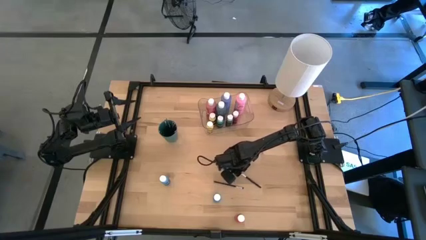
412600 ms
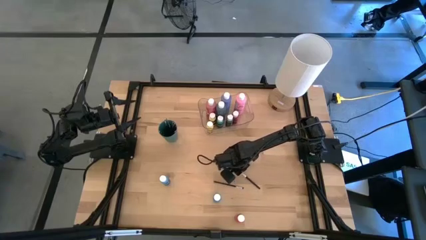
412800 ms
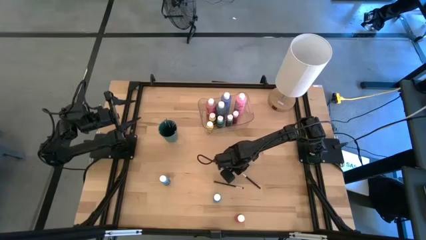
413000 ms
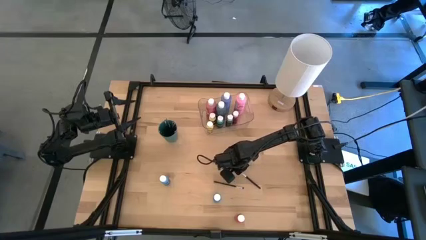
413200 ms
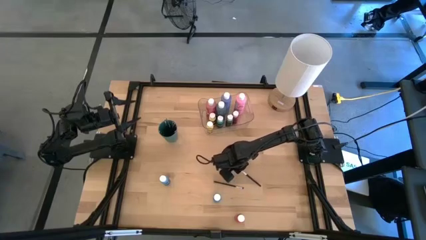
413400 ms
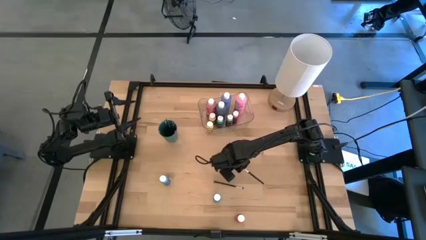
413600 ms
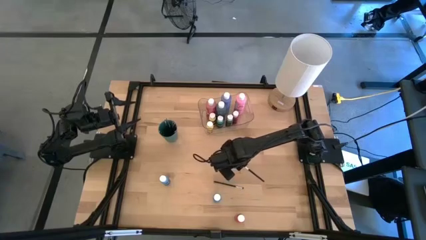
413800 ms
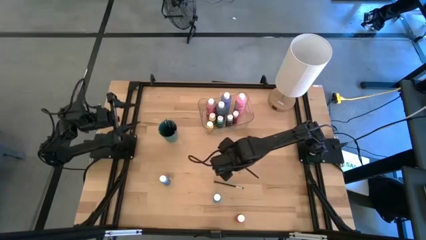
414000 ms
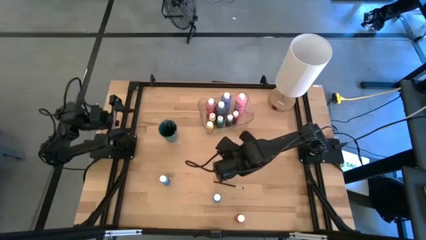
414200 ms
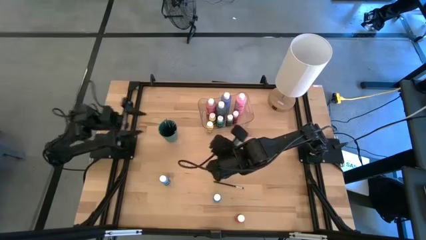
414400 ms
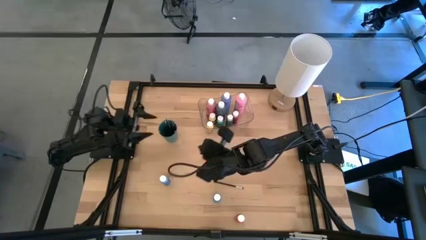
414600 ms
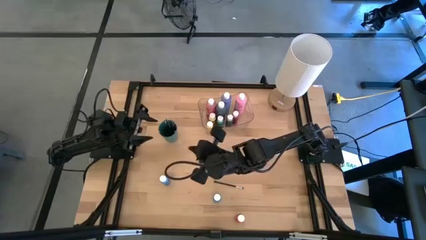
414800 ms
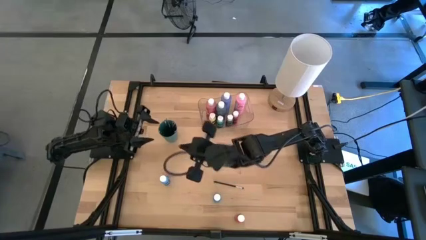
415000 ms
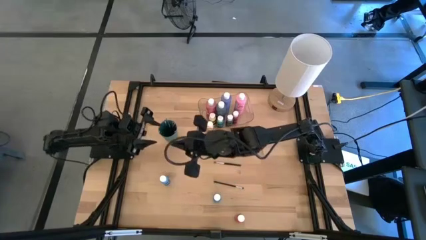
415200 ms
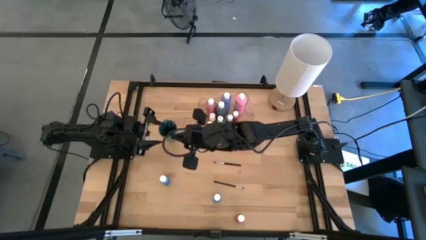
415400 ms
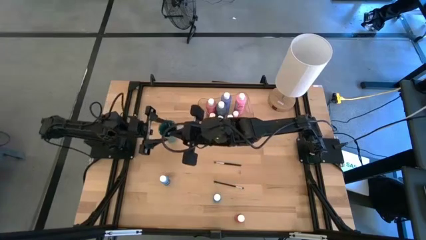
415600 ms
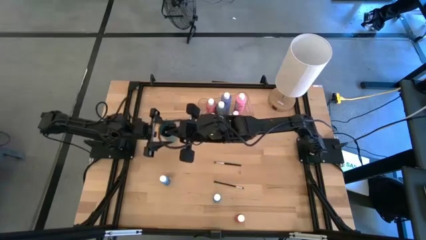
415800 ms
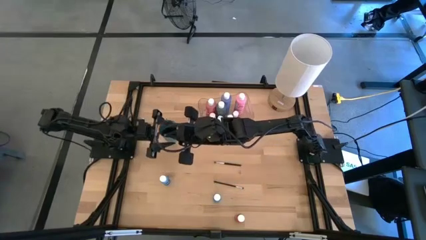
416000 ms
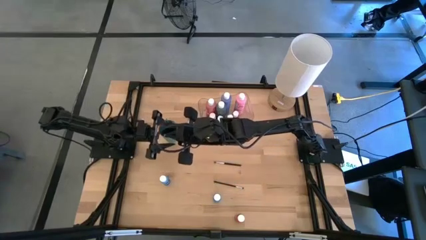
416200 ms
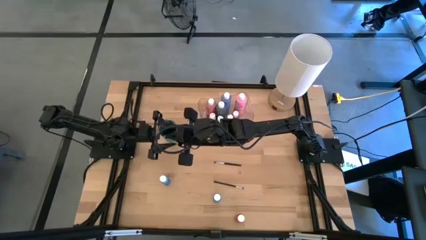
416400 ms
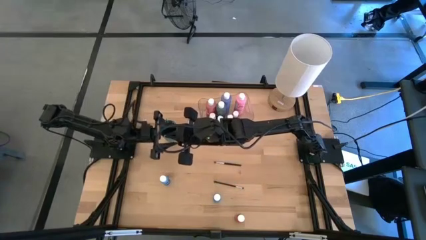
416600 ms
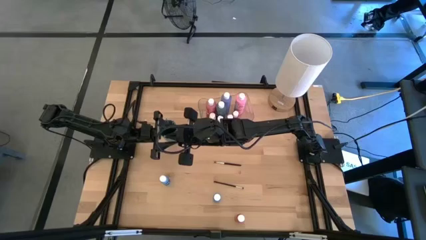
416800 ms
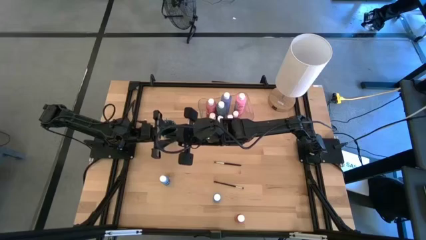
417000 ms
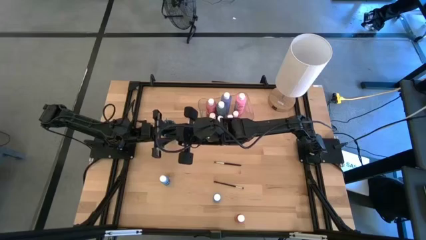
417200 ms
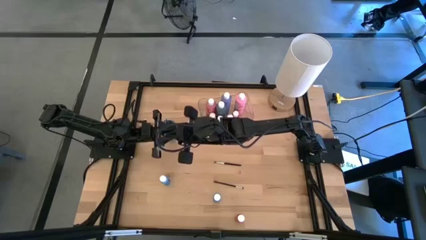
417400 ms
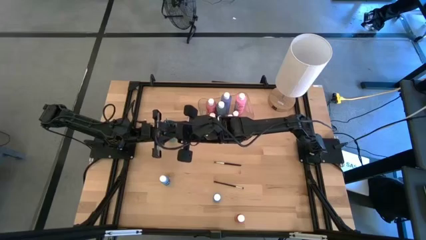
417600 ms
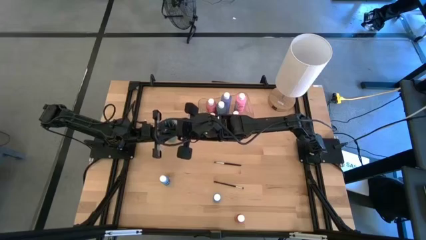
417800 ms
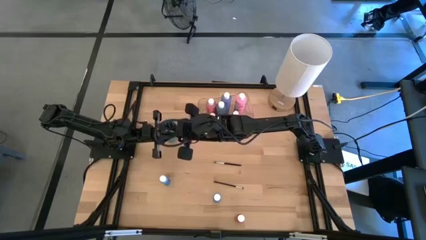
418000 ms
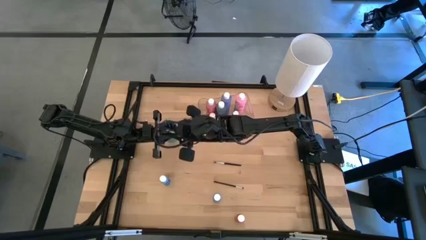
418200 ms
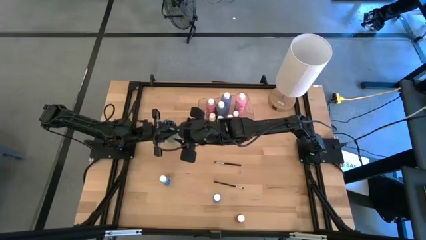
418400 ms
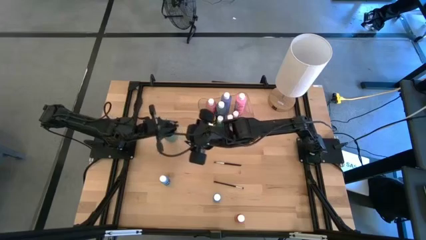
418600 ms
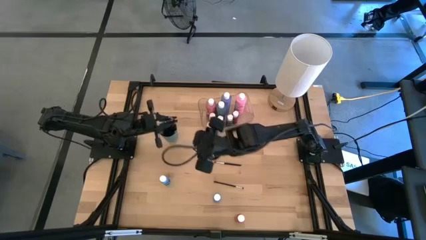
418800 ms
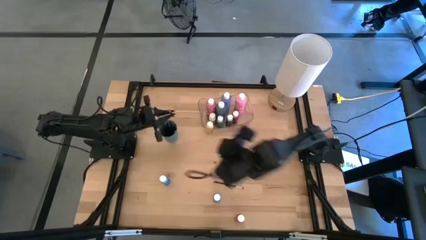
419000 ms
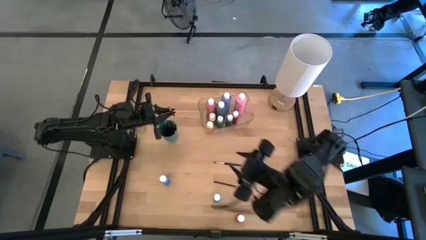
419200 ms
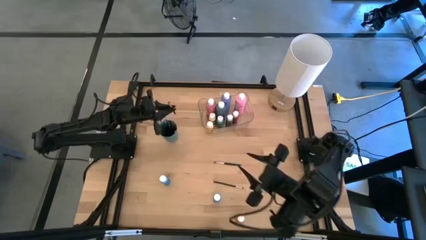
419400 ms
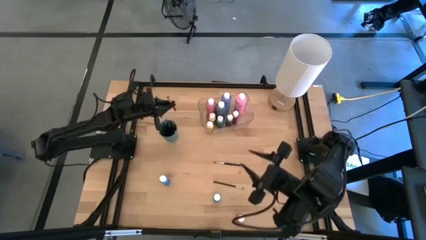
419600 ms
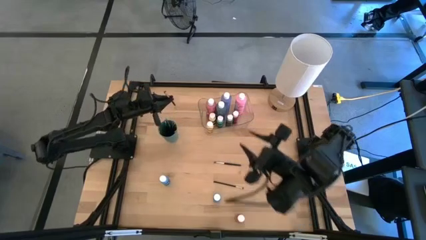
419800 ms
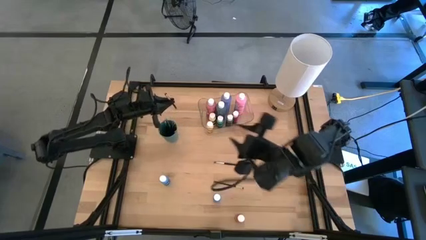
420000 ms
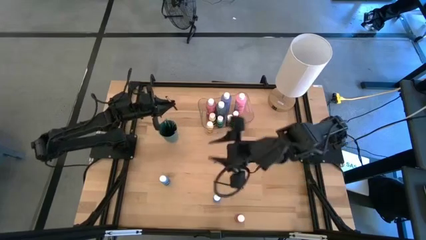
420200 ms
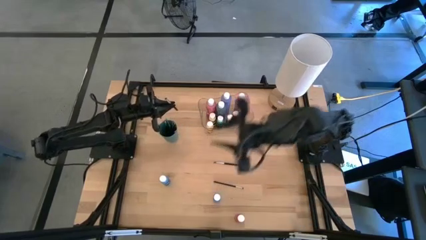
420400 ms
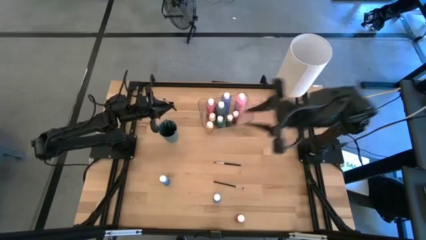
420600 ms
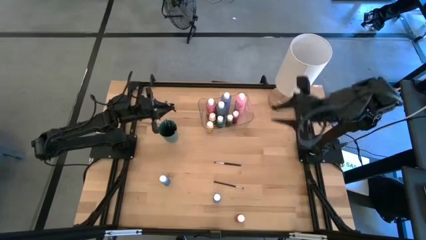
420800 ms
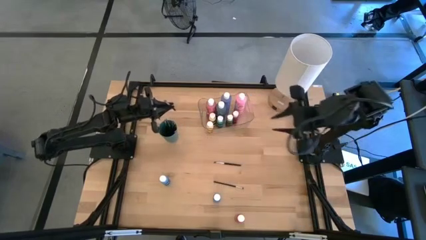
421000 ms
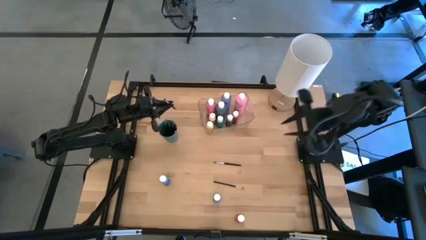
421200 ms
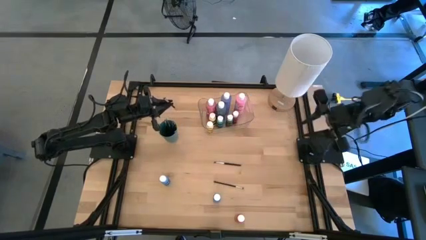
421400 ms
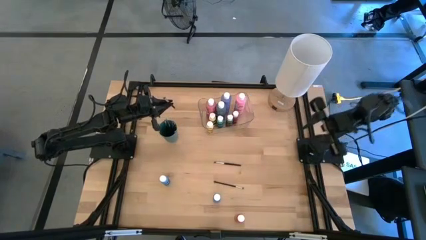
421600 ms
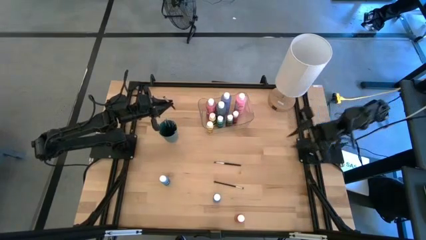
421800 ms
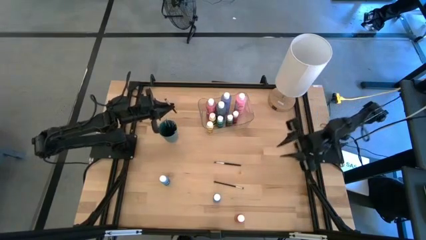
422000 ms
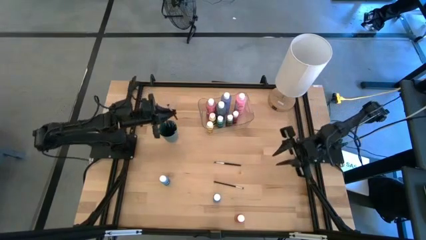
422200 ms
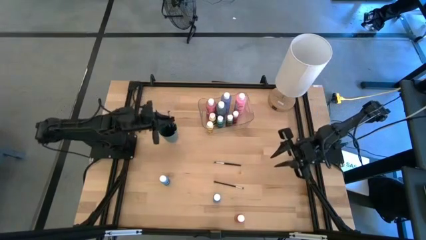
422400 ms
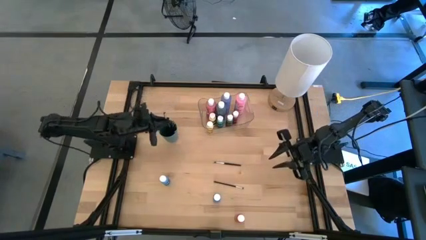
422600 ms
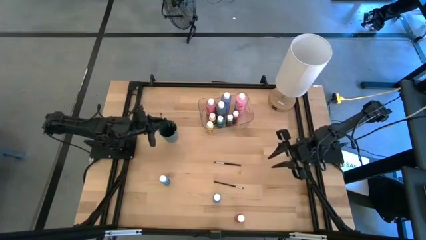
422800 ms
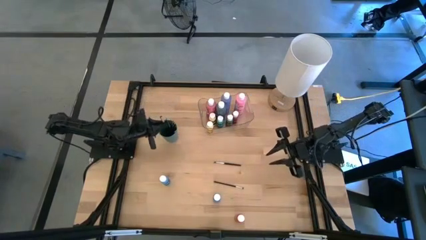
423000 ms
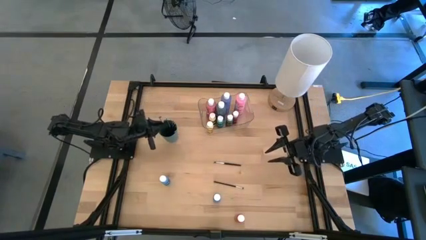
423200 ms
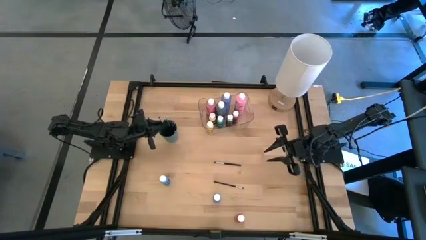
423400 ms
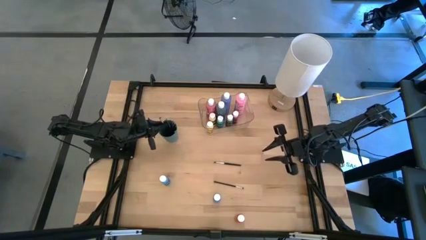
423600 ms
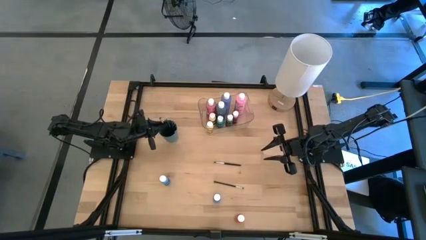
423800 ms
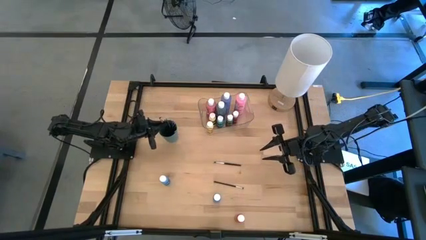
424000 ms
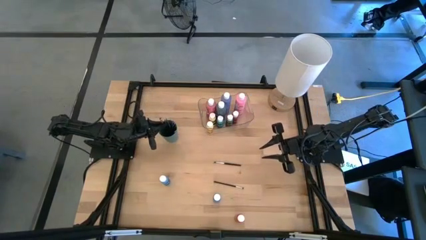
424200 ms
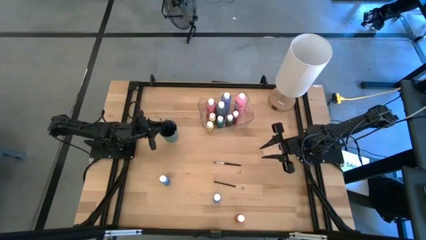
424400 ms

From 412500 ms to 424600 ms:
Task: Pick & Place Paint Supplies
Put the black paint brush into the green cup

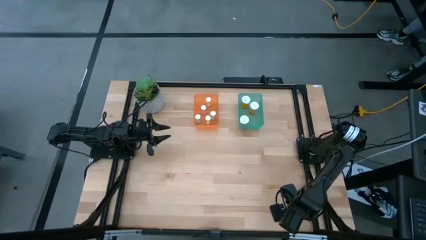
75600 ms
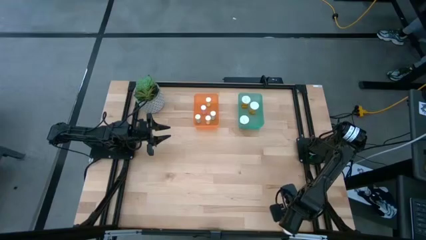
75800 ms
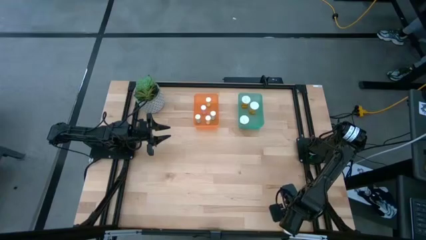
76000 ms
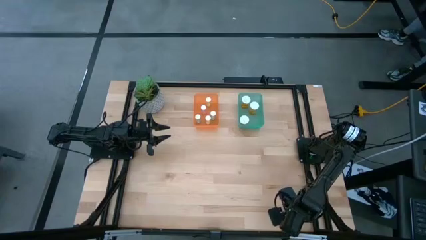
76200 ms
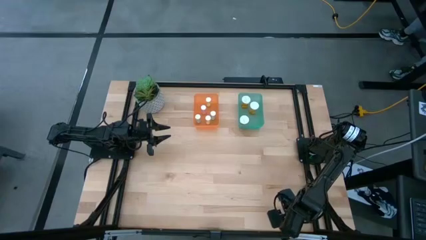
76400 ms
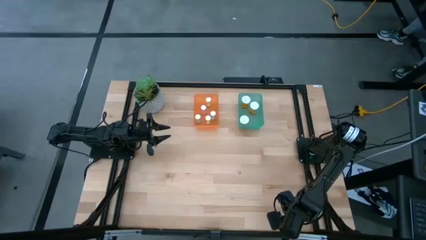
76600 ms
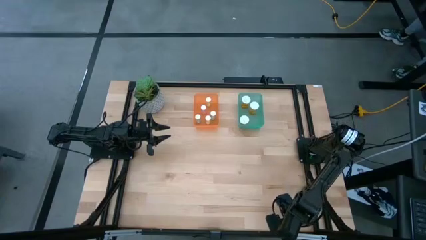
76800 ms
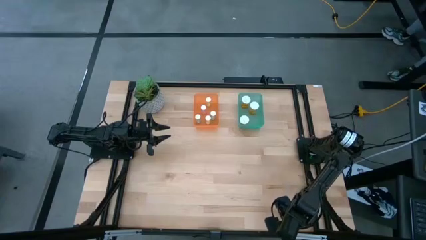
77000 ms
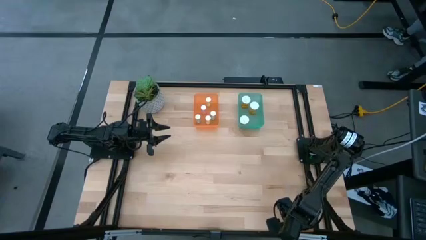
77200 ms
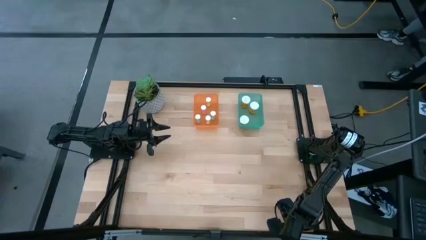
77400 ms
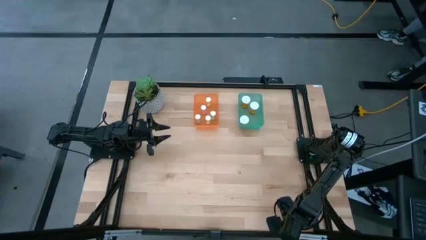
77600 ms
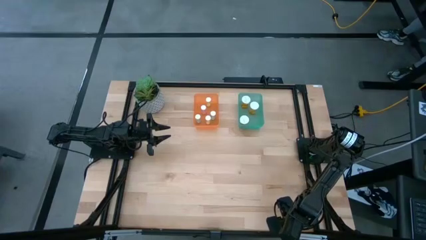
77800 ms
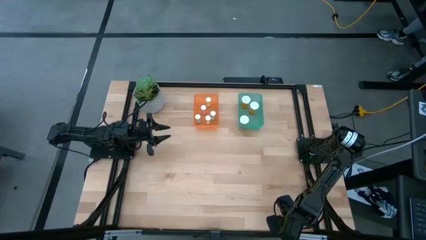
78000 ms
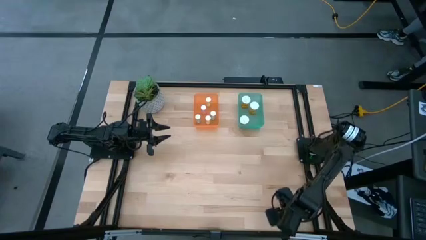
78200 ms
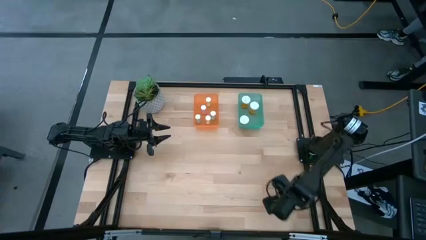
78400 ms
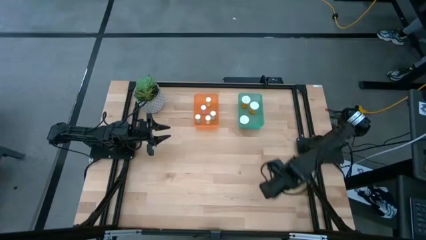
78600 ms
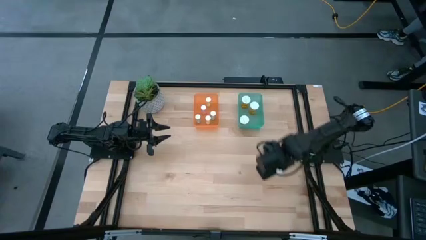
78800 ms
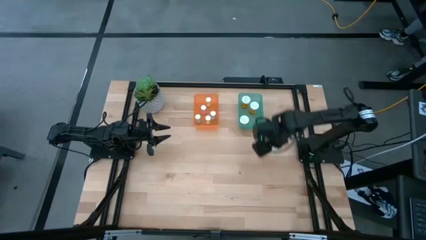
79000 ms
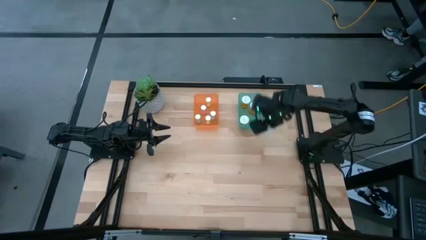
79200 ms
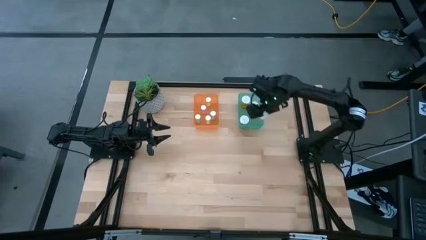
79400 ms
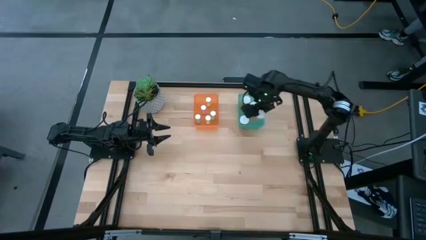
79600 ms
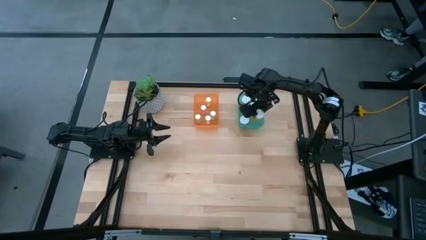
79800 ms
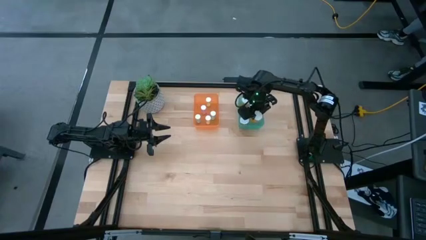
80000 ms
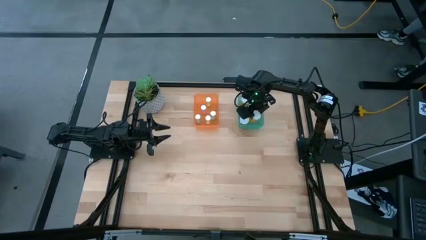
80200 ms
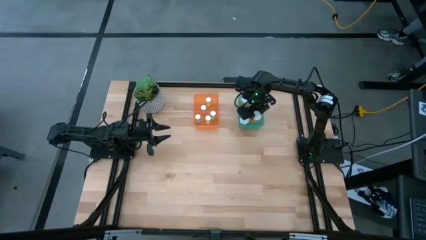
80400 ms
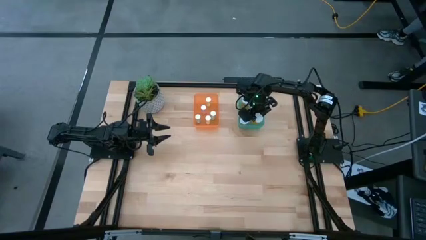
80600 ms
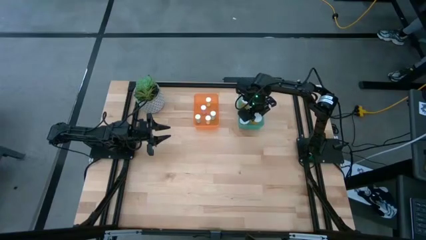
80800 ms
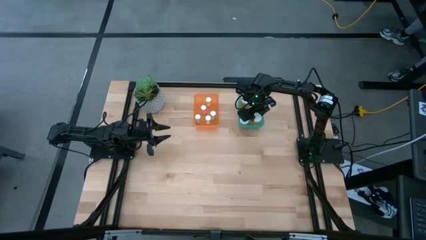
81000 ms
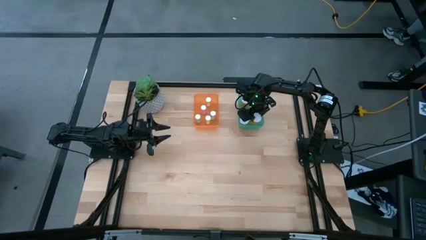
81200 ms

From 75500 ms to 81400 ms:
Task: Pick and place medicine bottles into bin by pill shape (circle, oval)
Put the large orange pill bottle into the blue bin
